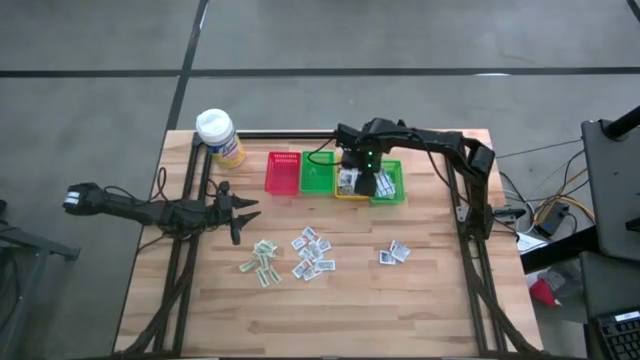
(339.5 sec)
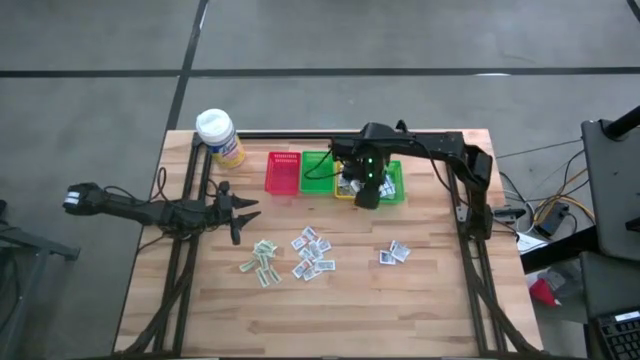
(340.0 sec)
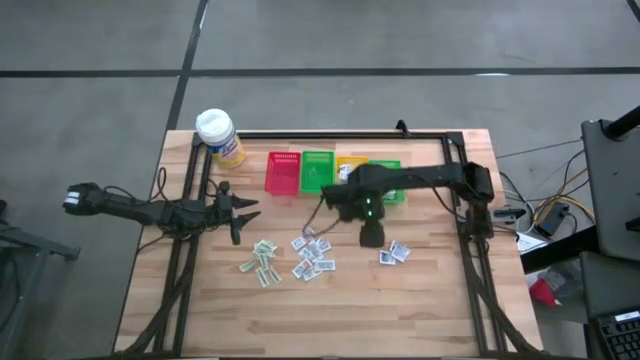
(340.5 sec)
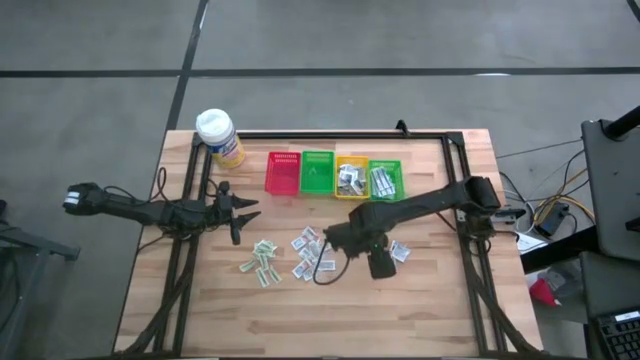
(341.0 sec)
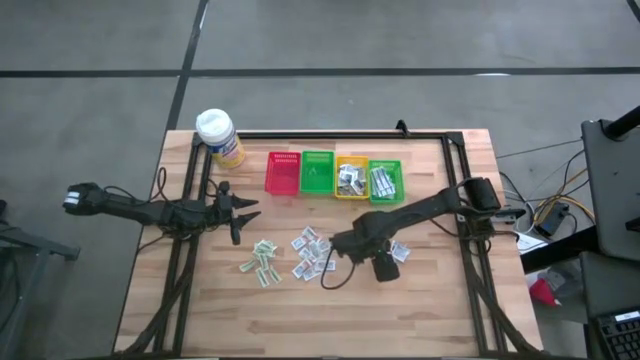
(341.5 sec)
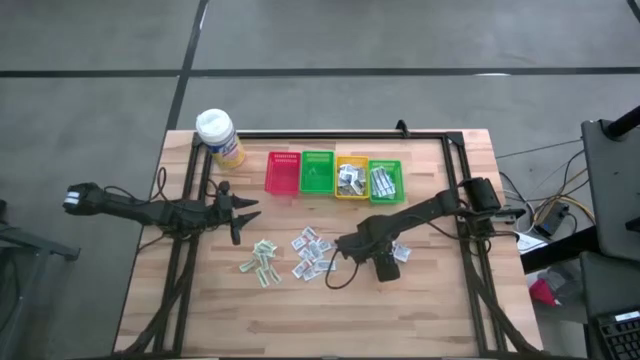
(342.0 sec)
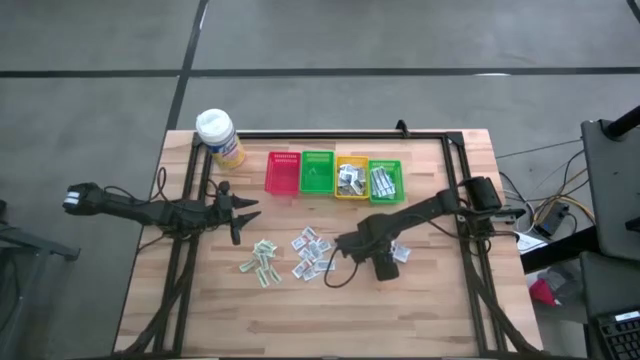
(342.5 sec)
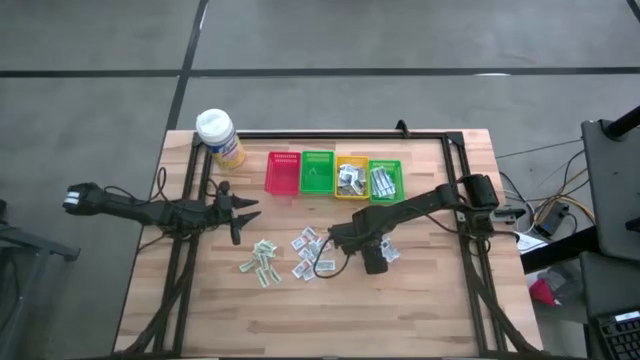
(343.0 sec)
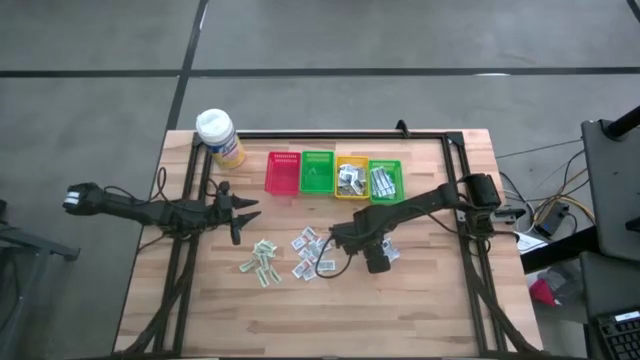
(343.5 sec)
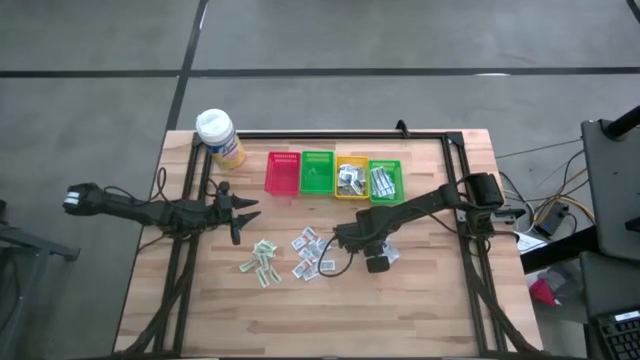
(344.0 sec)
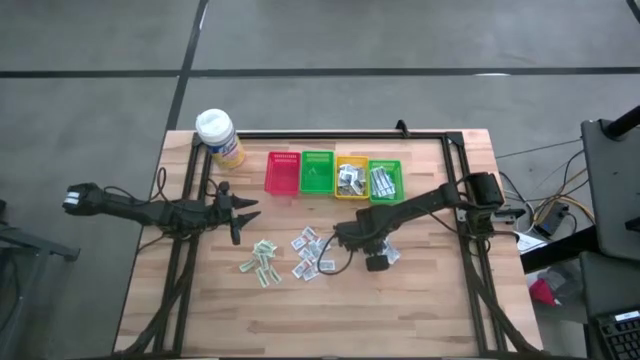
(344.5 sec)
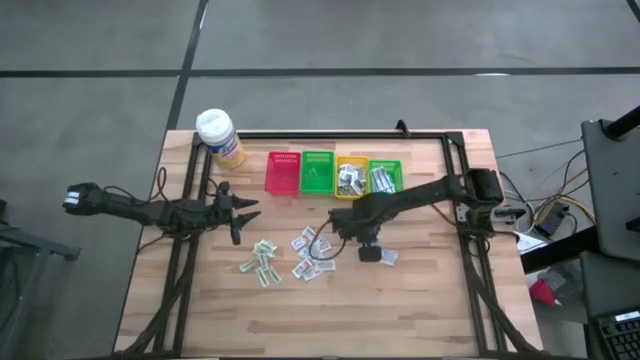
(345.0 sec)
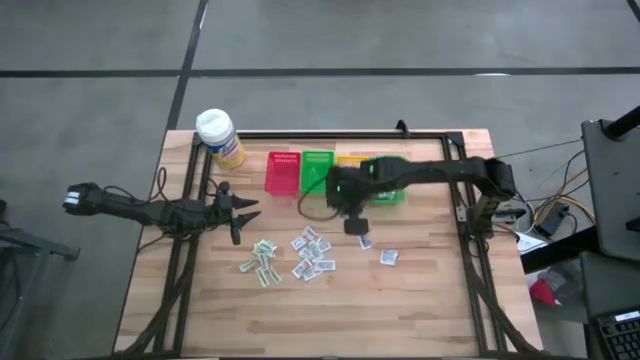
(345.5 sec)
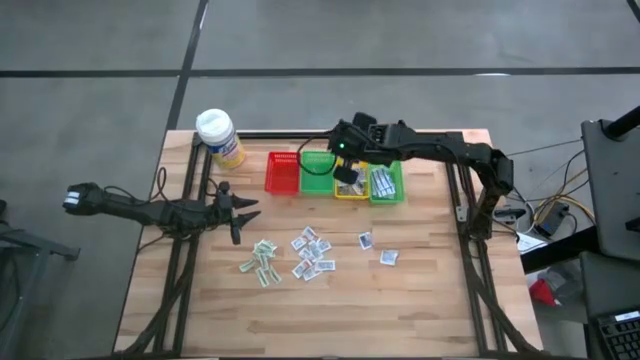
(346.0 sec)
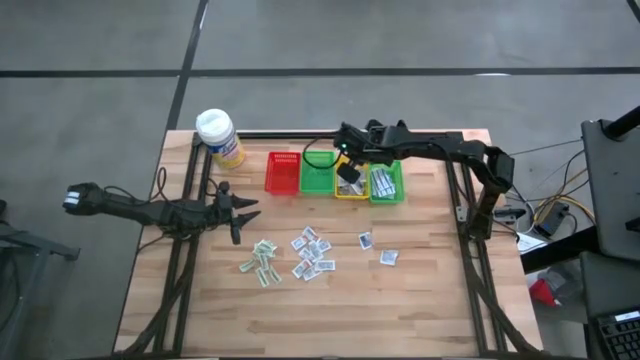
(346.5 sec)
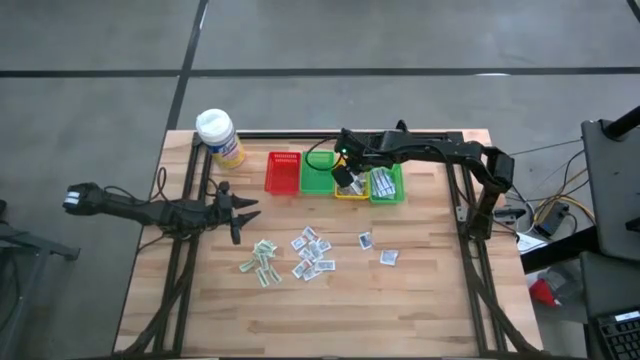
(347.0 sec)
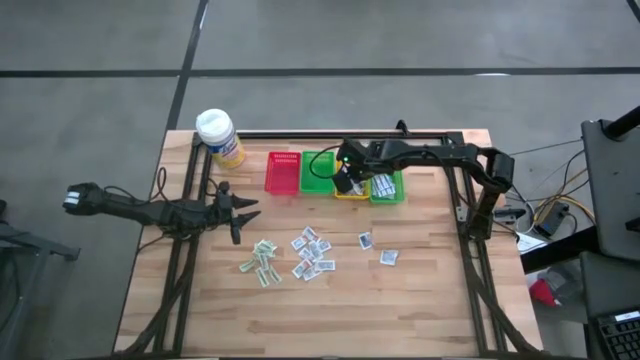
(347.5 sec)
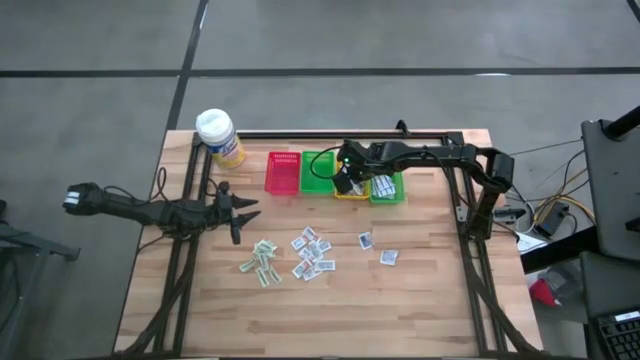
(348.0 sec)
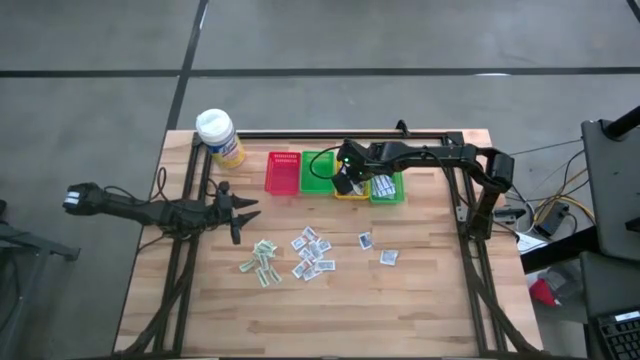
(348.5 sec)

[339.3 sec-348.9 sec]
Task: Pick & Place First Aid Supplies
Put the blue alcohol pad into the yellow bin

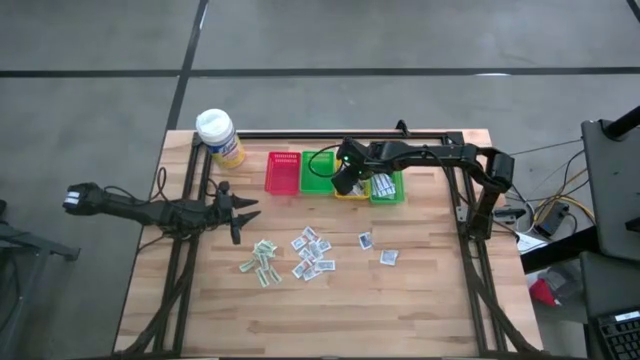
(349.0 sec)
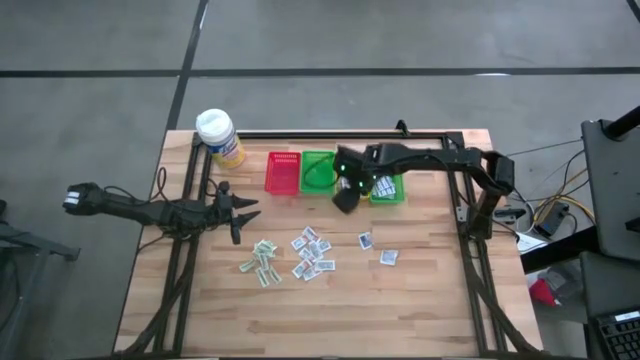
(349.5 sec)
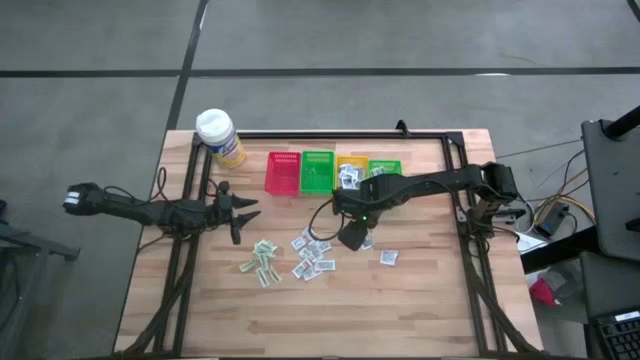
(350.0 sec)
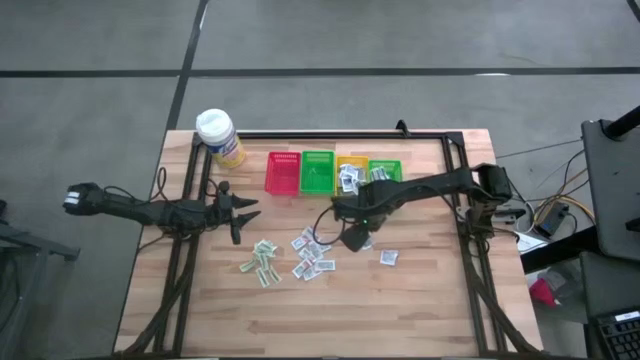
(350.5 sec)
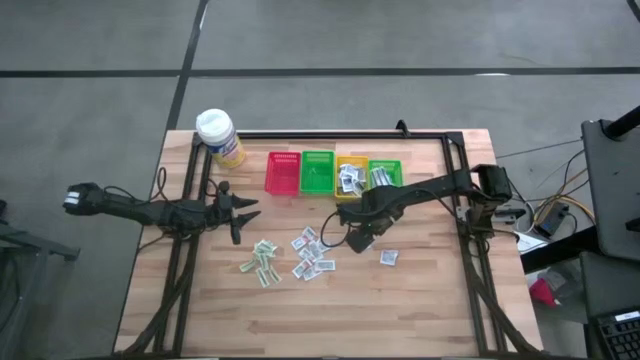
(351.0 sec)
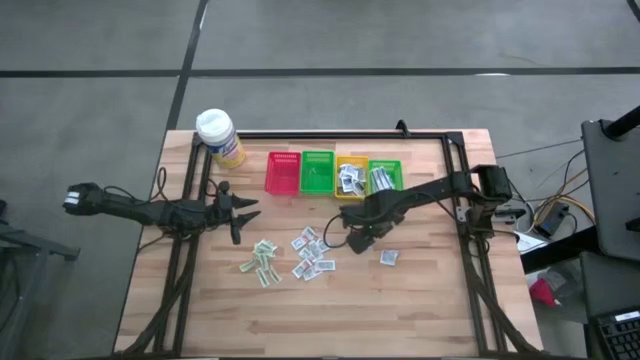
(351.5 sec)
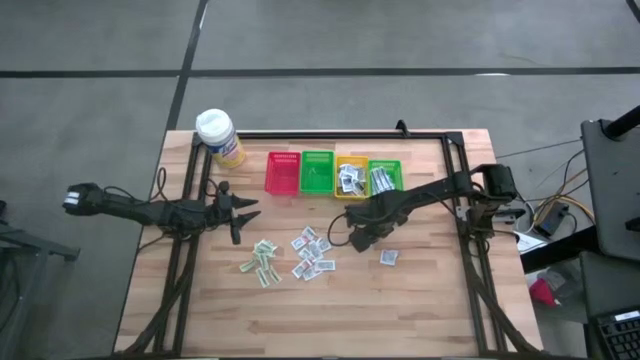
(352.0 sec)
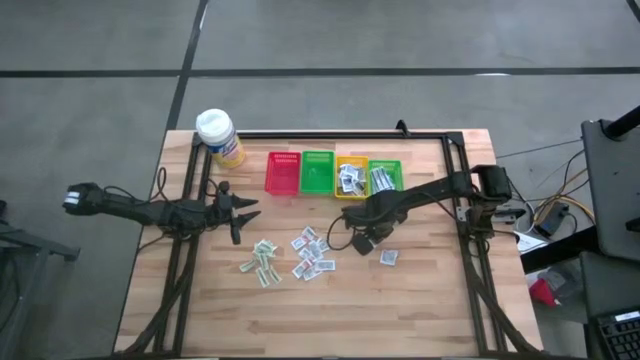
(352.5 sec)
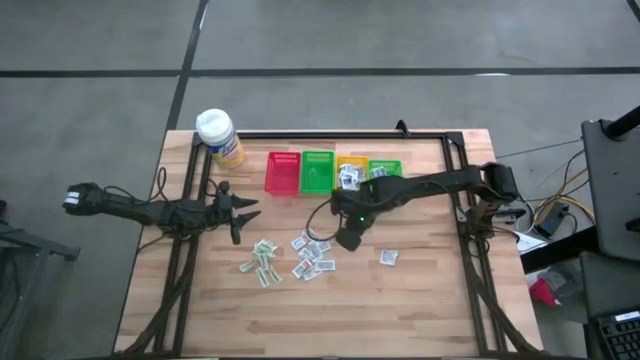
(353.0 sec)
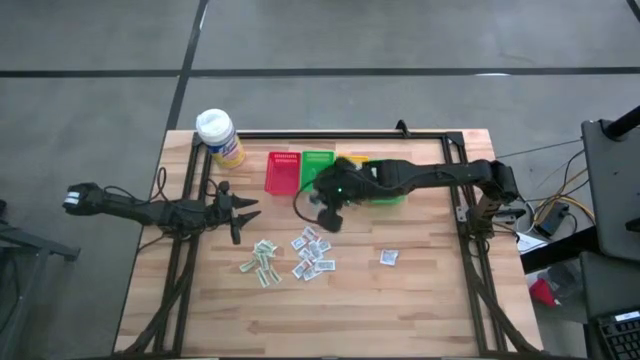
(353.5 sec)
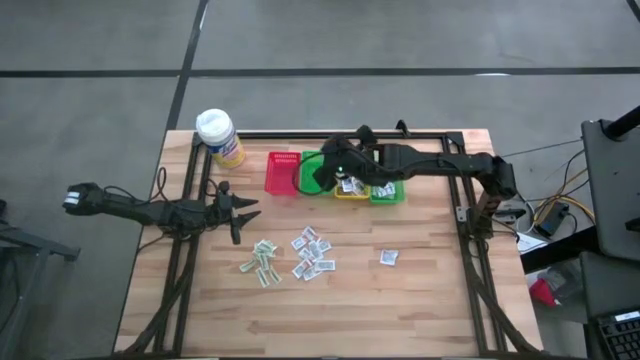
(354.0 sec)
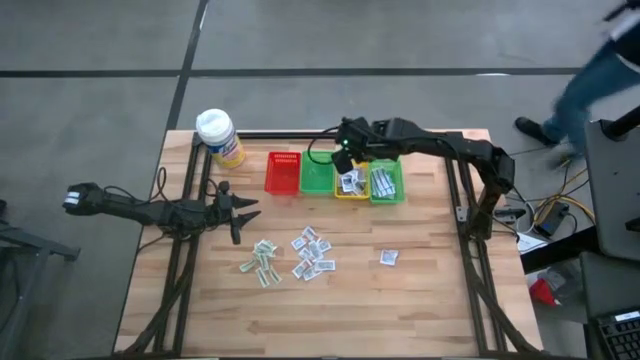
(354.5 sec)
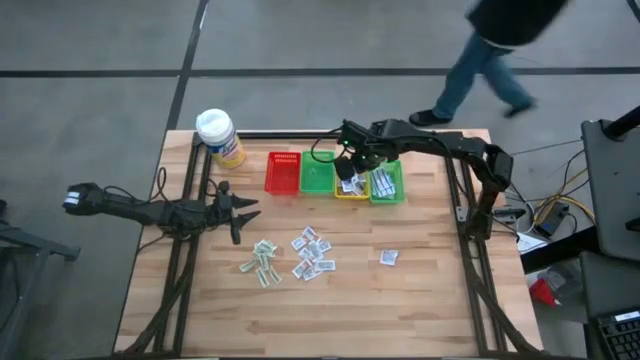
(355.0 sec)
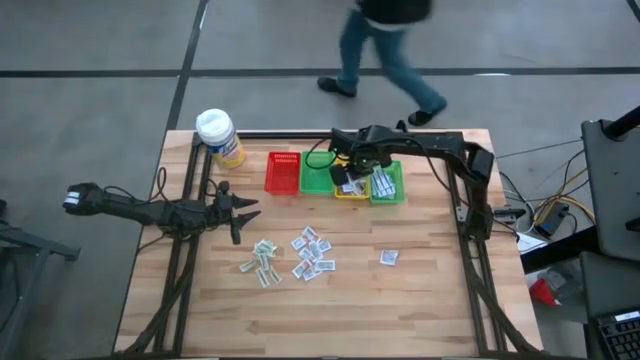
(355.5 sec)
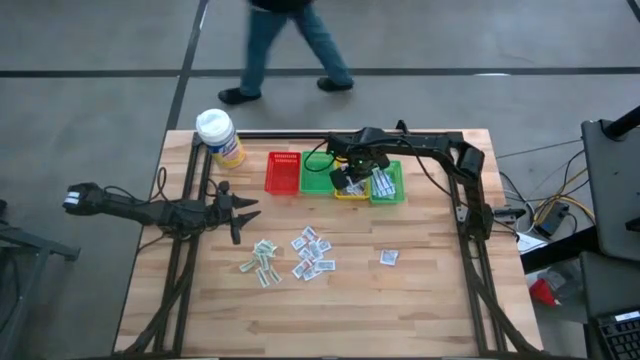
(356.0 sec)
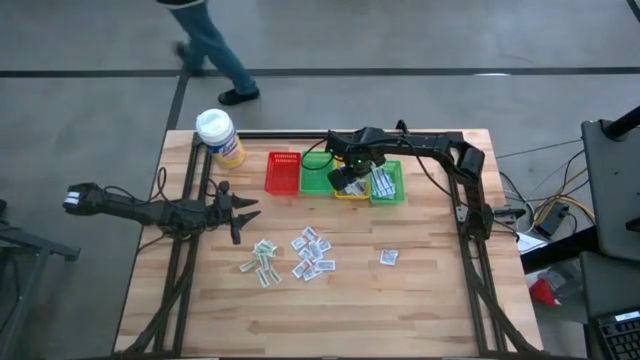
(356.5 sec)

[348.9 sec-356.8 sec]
Put the blue alcohol pad into the yellow bin

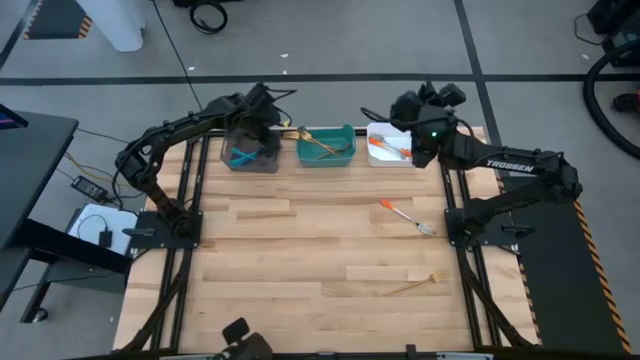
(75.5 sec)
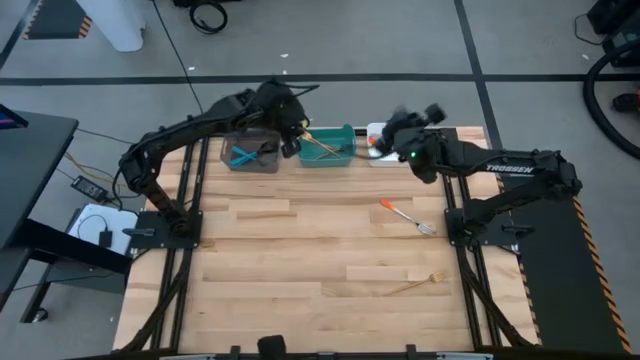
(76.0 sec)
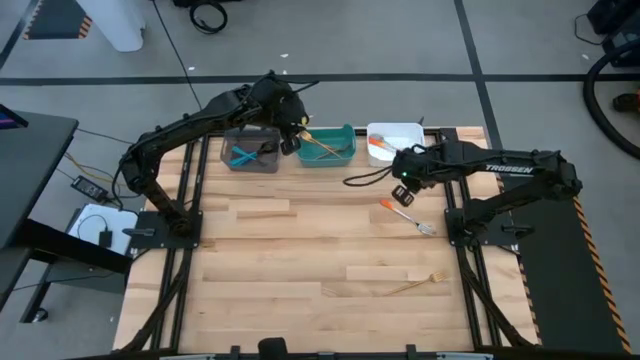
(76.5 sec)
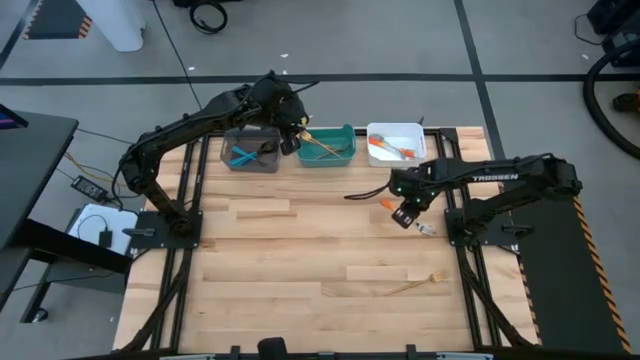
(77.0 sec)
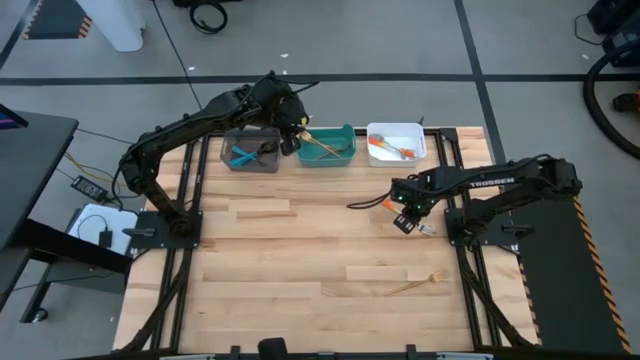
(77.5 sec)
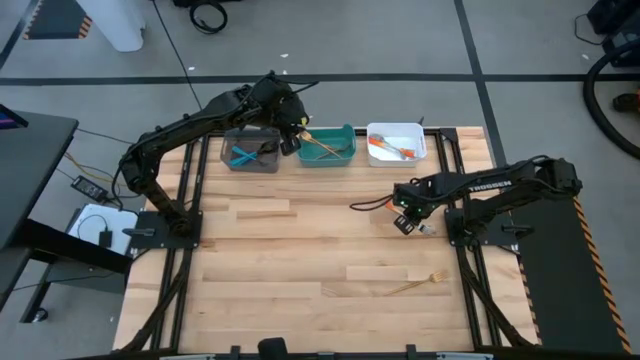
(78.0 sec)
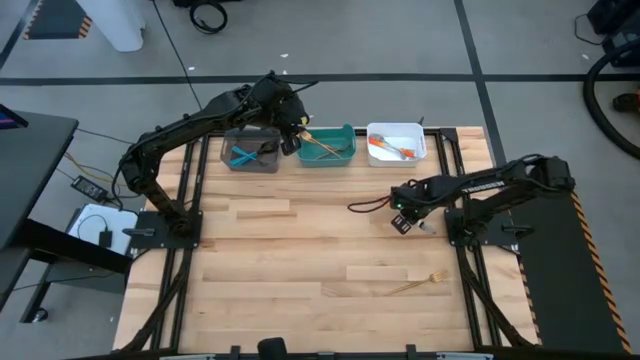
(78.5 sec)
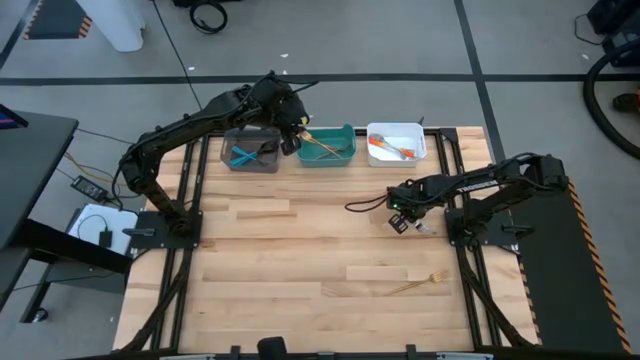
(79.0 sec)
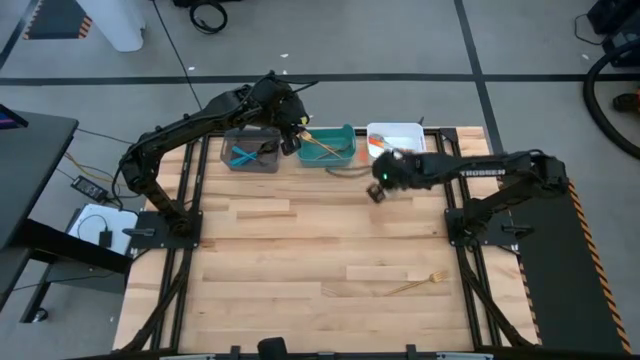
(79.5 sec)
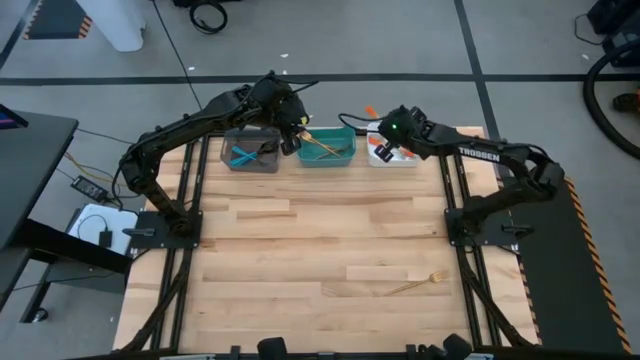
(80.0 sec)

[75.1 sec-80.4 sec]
Task: Sort silverware by color (type)
Put the orange fork into the white bin
